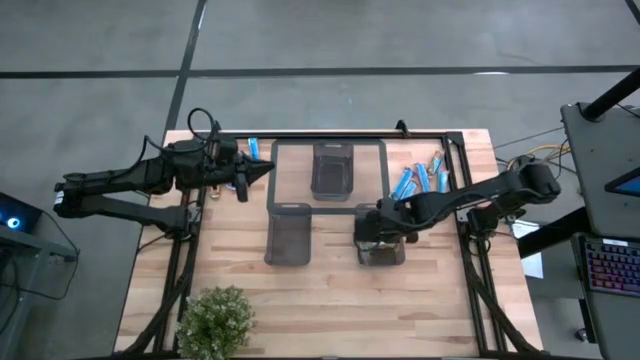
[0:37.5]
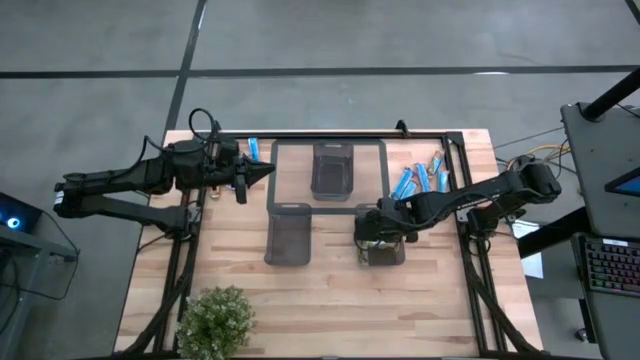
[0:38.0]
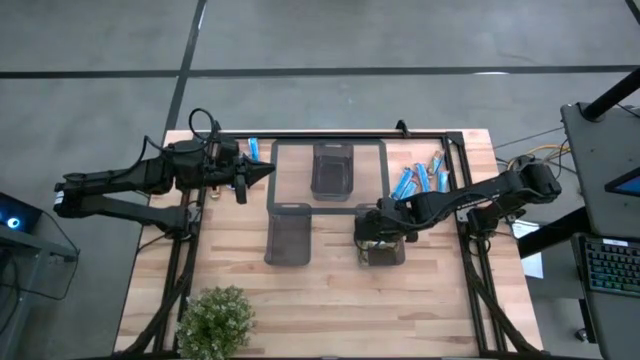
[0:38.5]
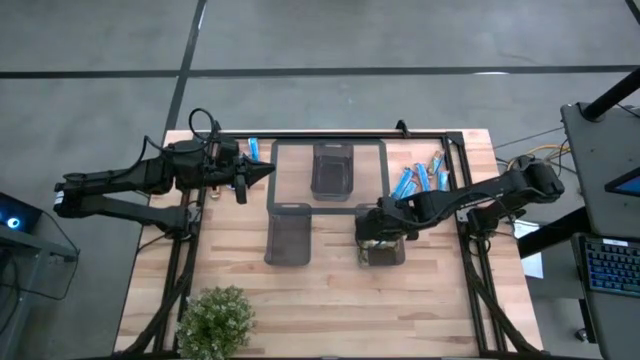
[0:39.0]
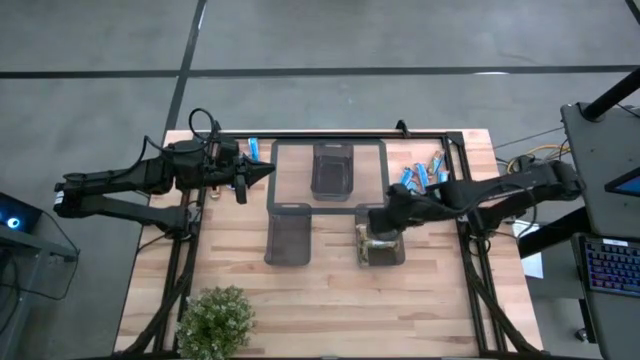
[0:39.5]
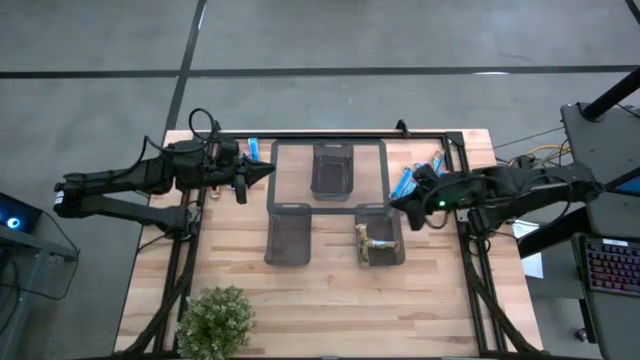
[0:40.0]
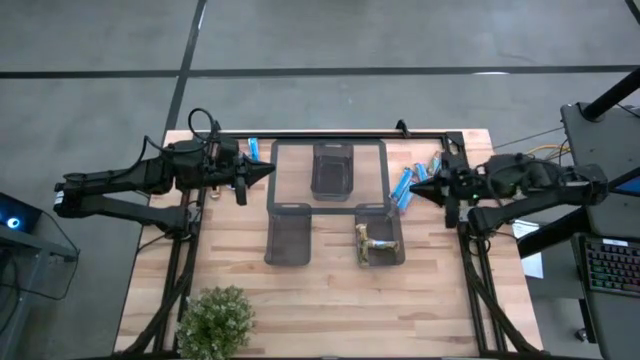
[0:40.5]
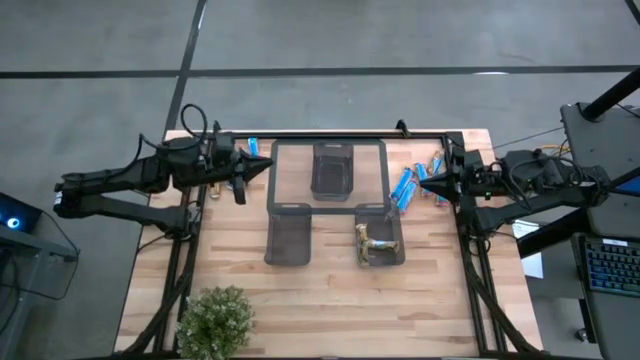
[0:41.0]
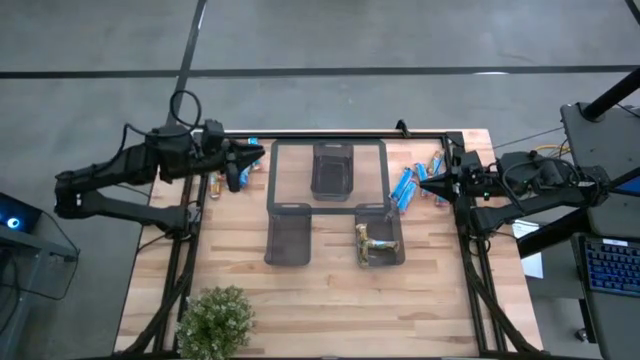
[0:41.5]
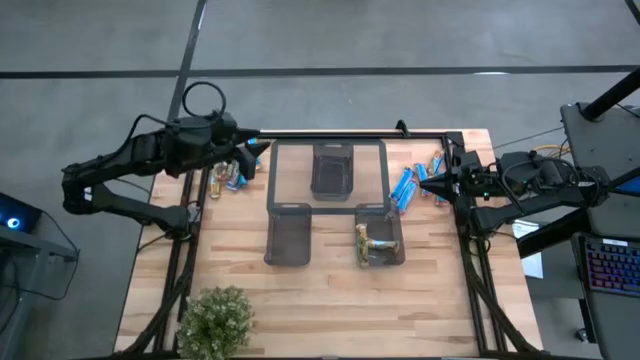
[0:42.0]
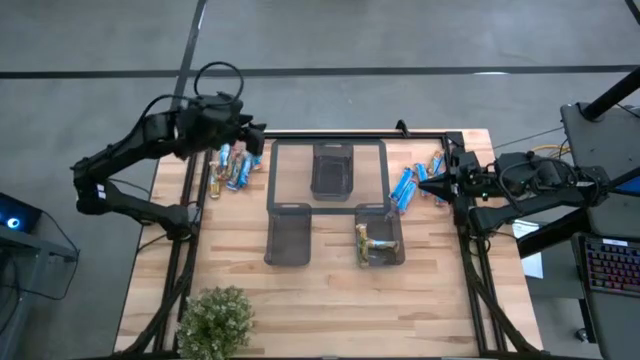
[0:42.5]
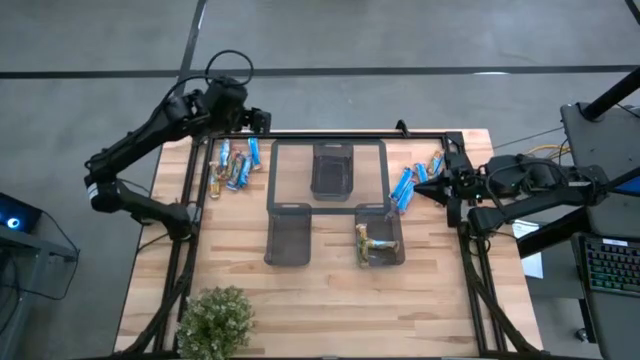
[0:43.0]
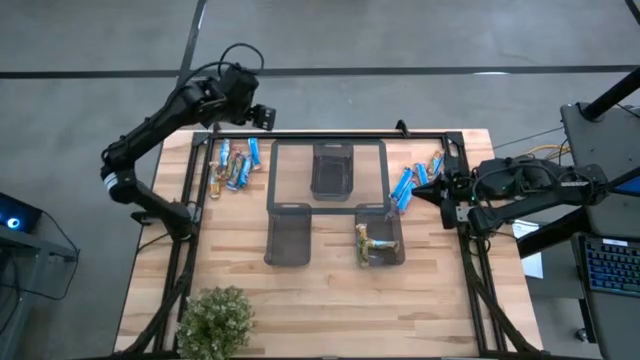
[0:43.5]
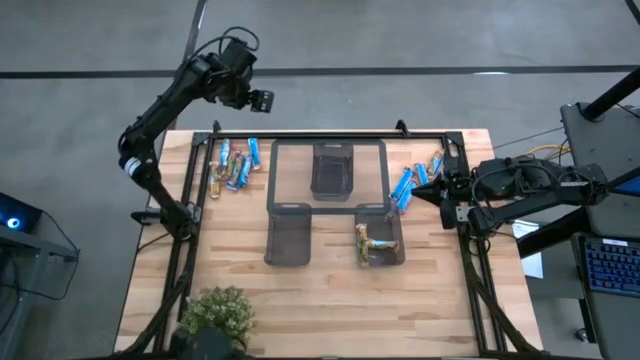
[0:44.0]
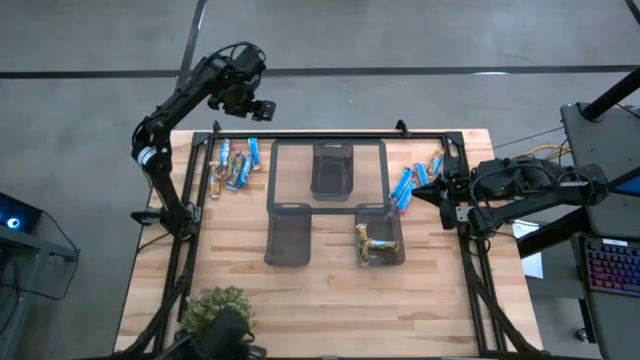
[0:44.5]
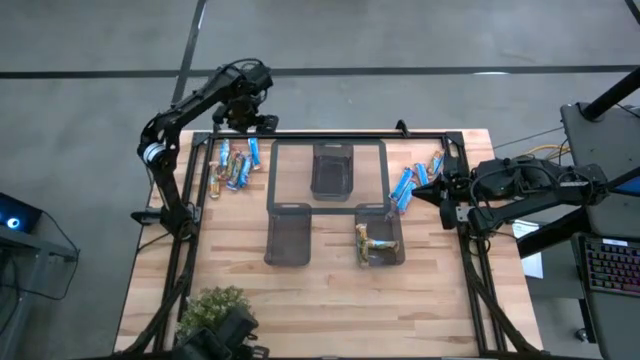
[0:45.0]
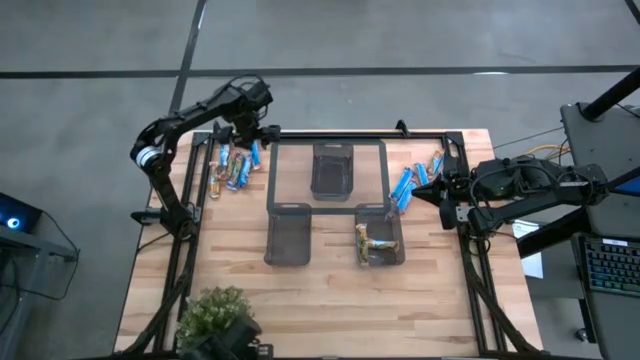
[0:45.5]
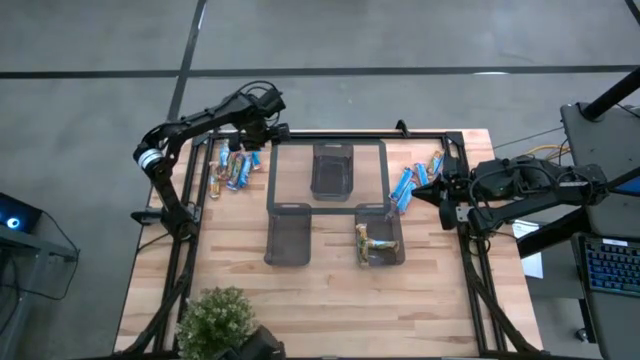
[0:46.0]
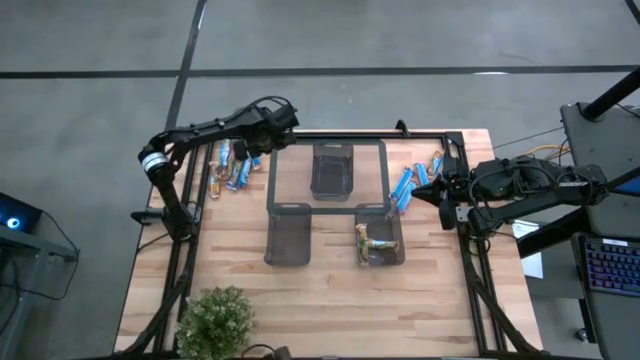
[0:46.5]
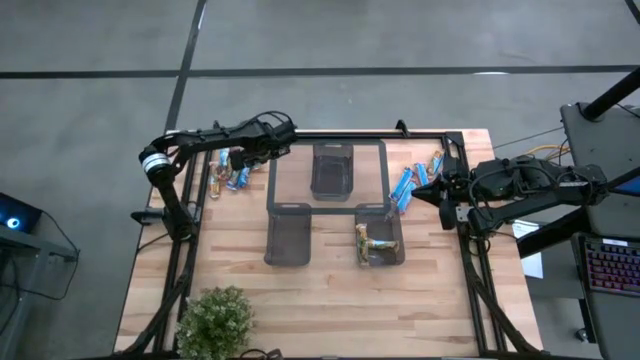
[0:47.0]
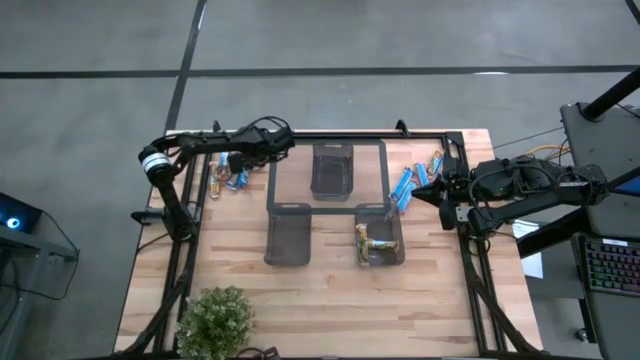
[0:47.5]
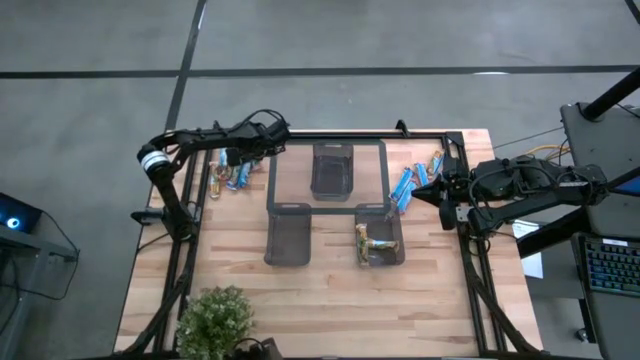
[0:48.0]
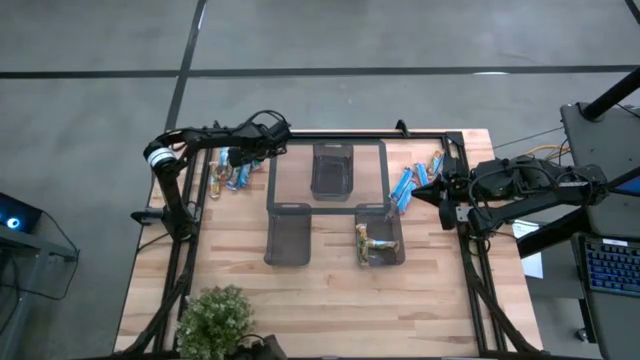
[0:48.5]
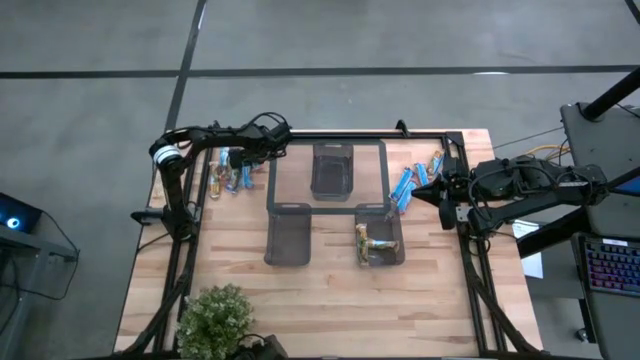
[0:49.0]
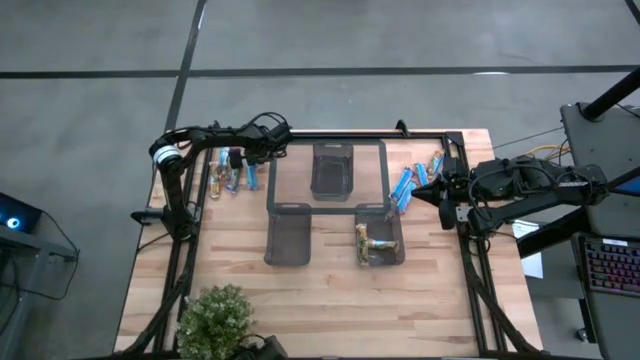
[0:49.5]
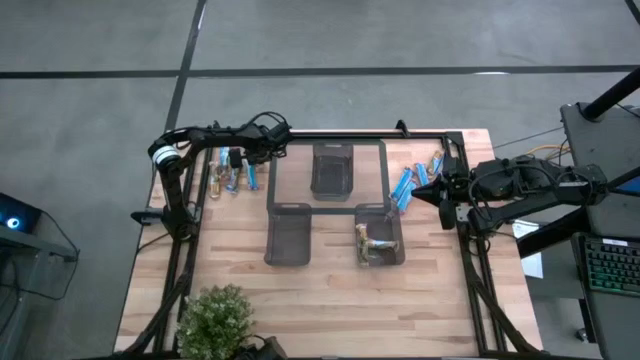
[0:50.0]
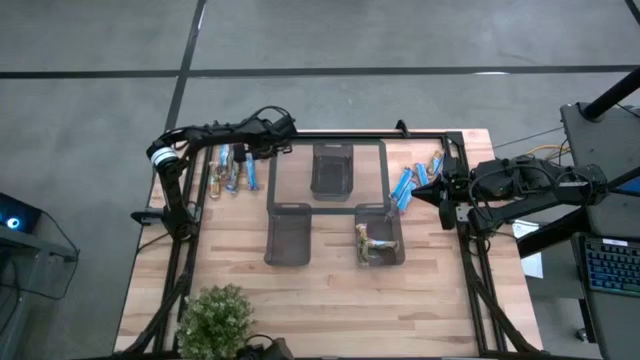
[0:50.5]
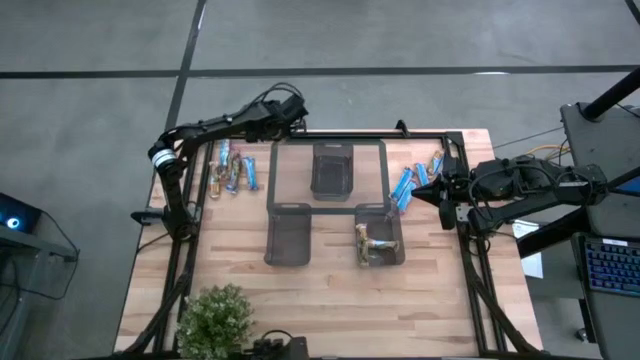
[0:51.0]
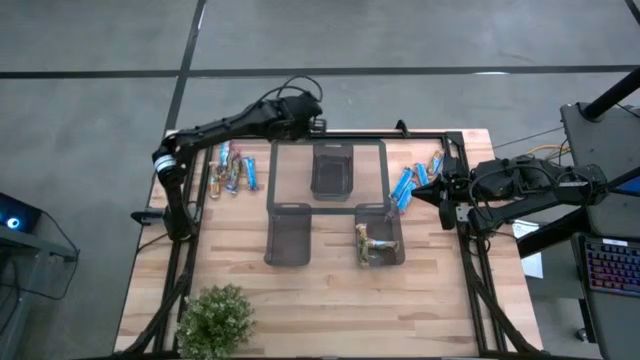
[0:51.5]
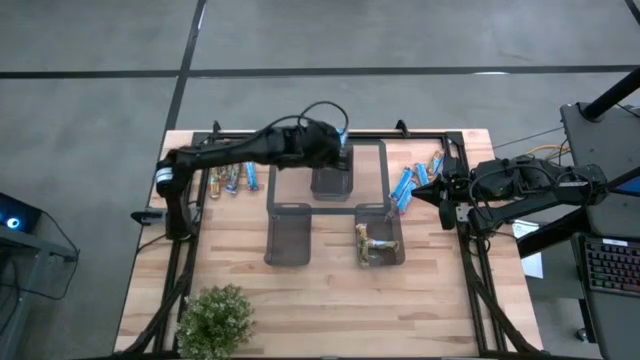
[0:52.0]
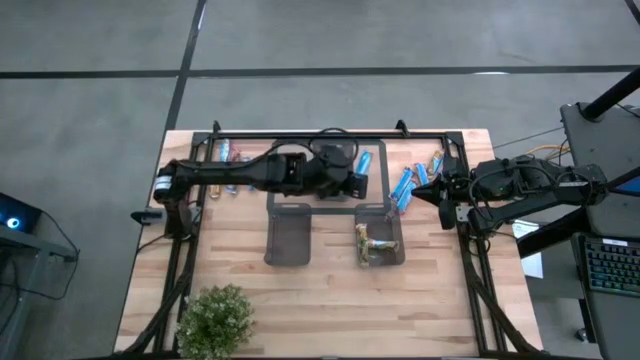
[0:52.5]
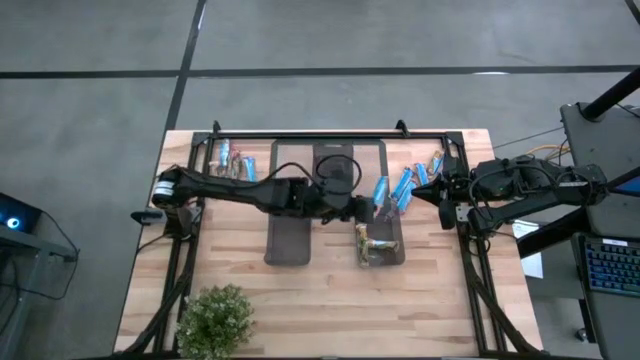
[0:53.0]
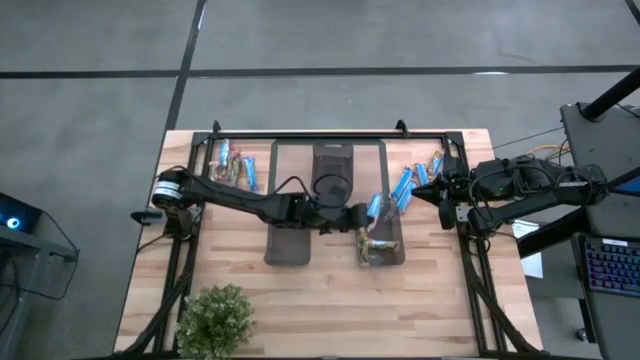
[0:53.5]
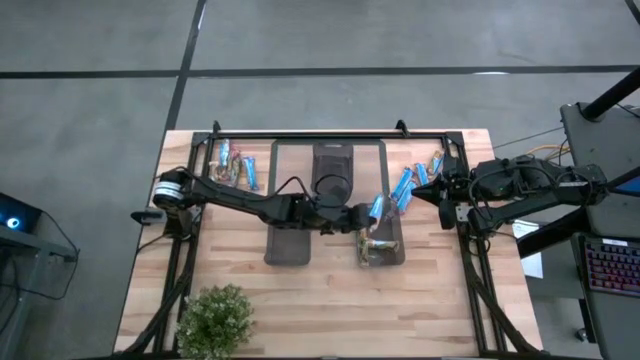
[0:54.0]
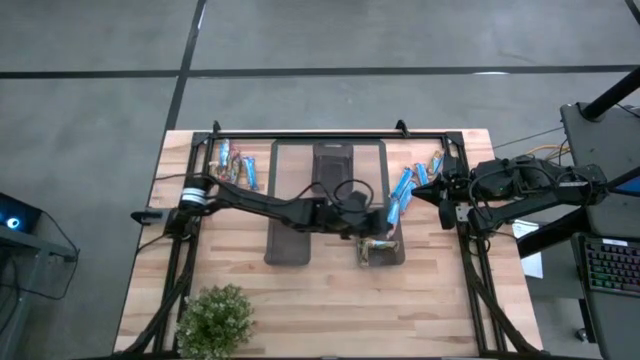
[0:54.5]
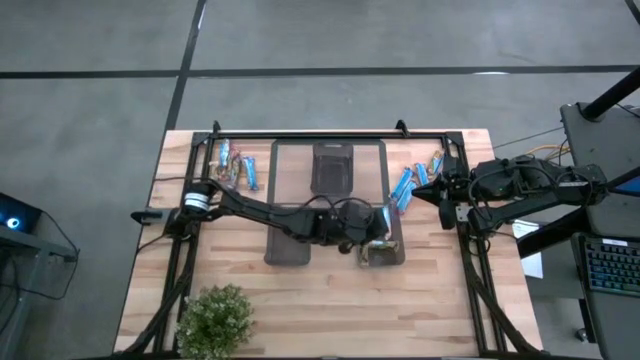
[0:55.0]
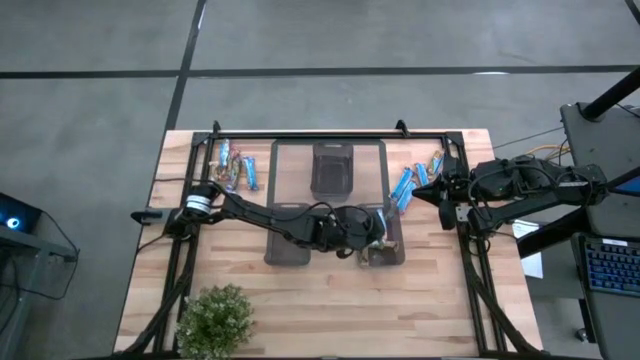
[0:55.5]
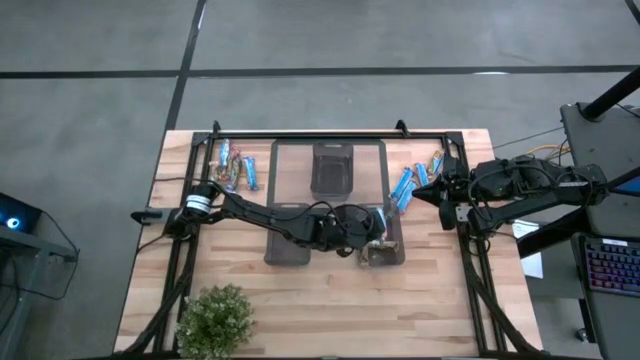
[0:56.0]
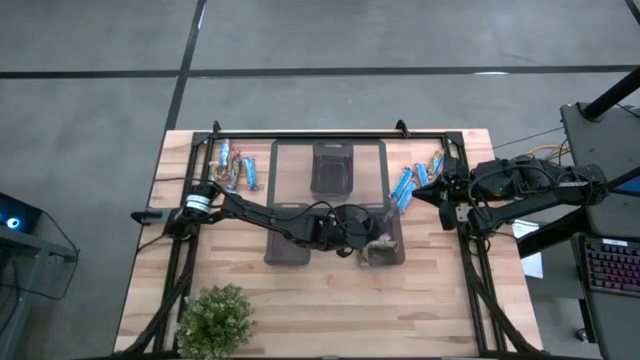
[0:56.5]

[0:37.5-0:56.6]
Task: Pick and place Granola Bars by type
Put the orange granola bar into the bottom right black bin

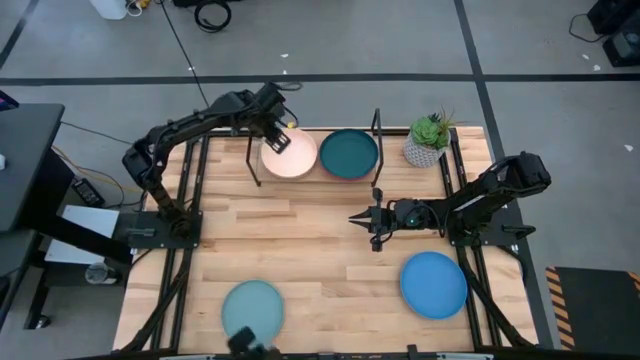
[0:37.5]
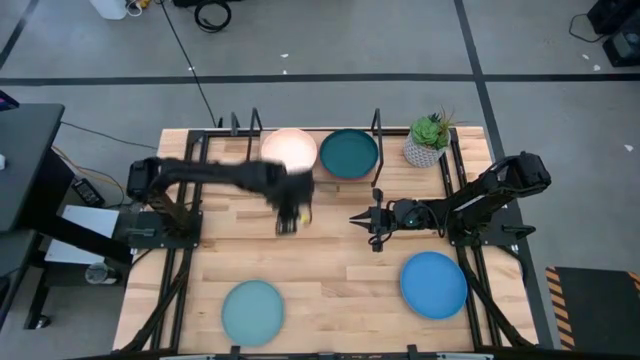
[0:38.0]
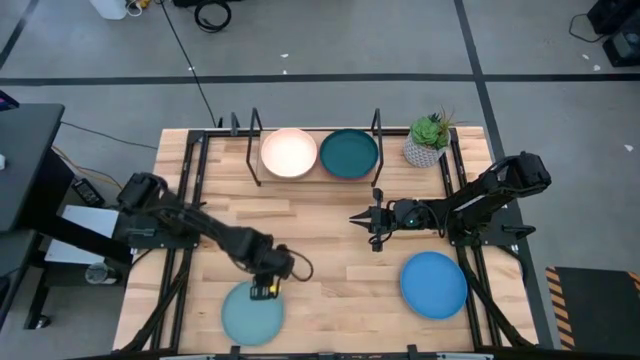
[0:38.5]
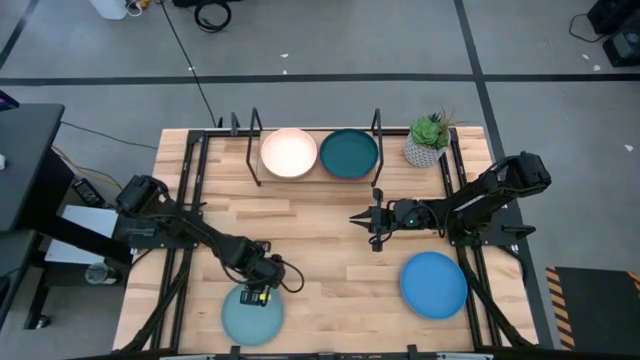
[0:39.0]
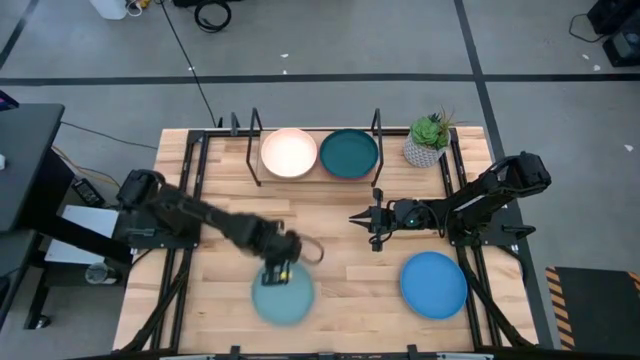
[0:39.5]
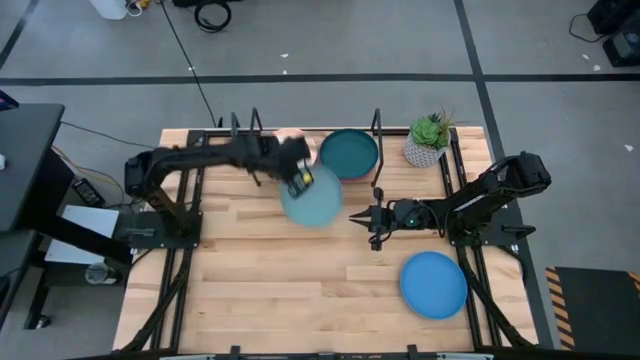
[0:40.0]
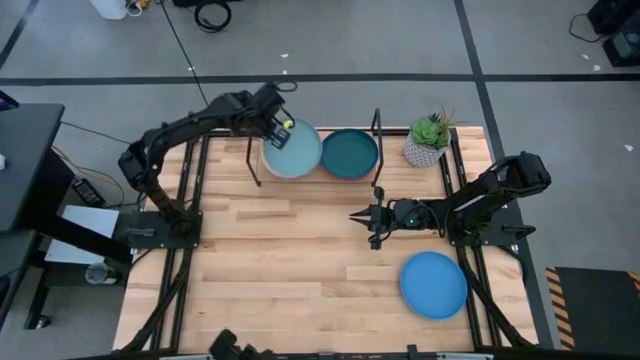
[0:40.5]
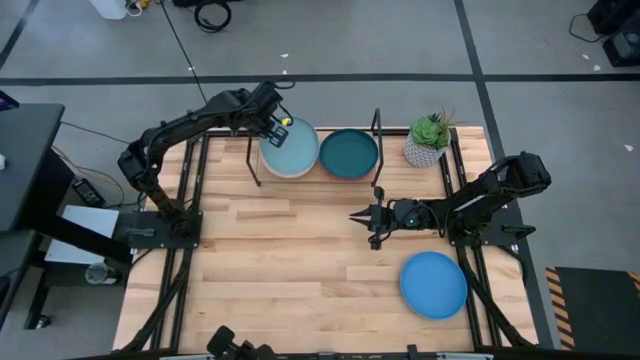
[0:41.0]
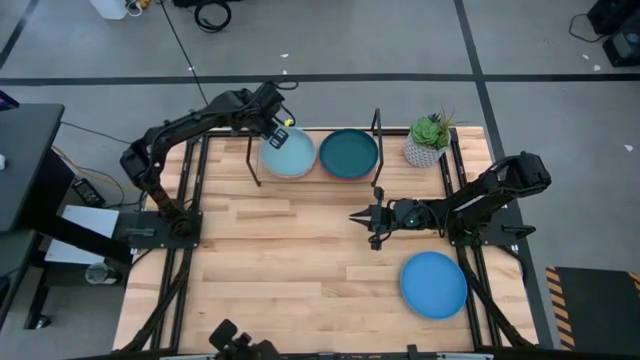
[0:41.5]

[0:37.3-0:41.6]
Task: Place and stack plates onto a shelf
Stack the light blue plate on top of the white plate on the shelf
